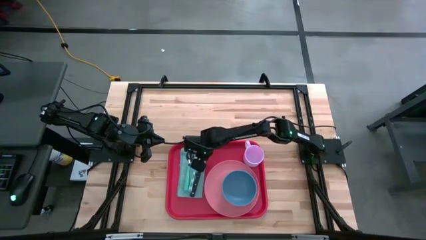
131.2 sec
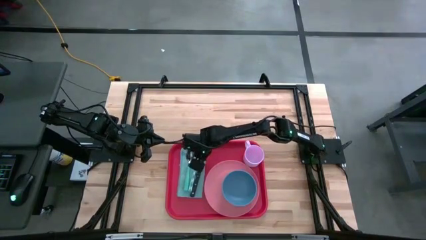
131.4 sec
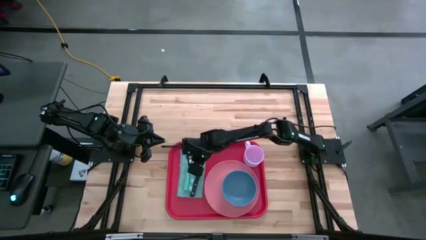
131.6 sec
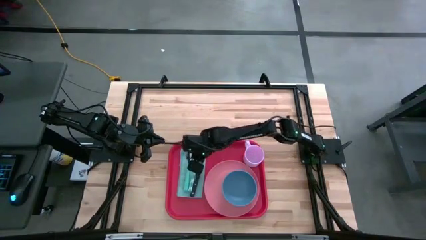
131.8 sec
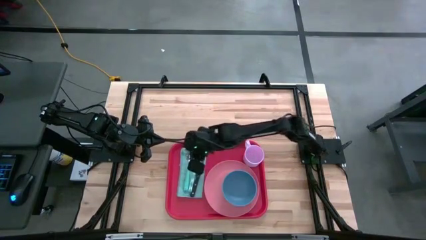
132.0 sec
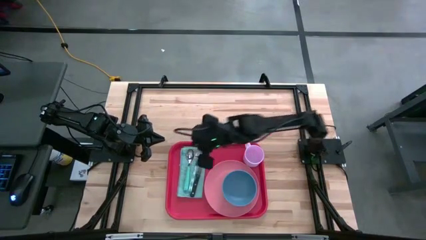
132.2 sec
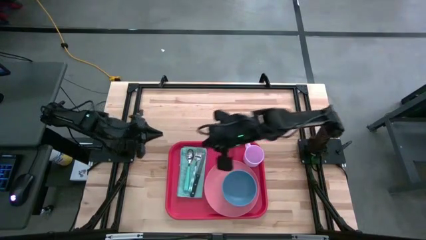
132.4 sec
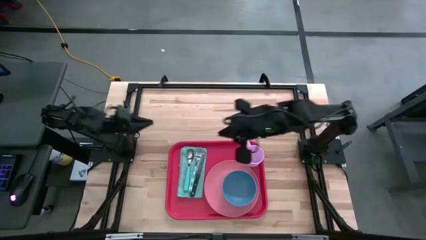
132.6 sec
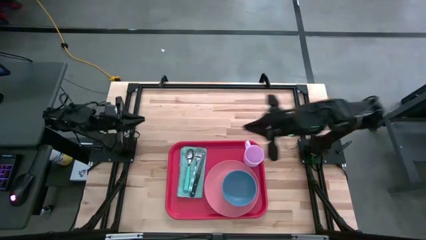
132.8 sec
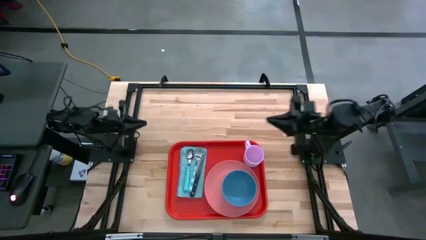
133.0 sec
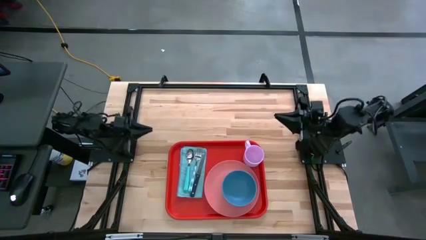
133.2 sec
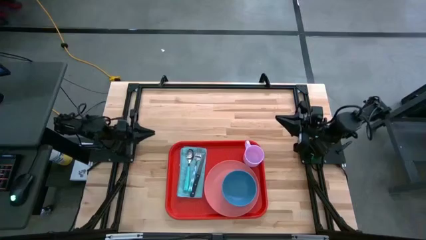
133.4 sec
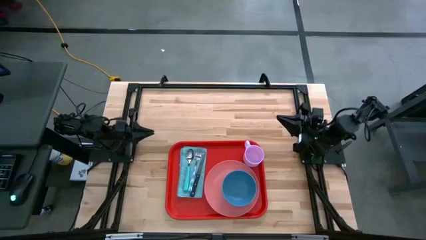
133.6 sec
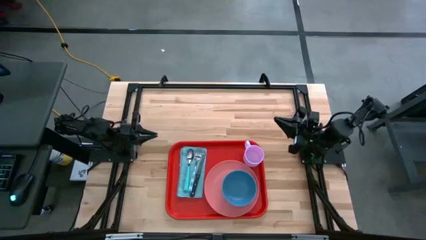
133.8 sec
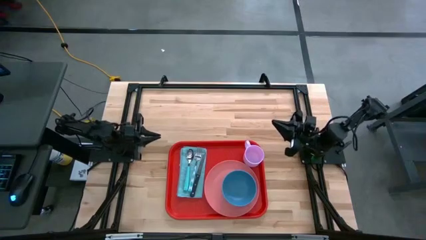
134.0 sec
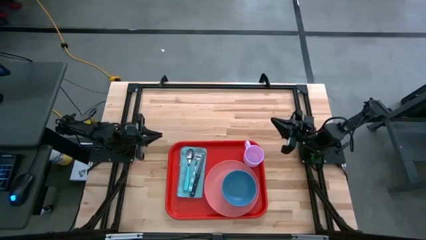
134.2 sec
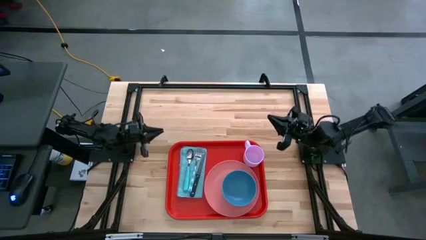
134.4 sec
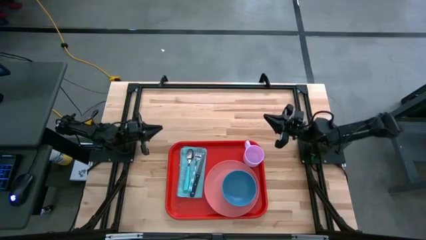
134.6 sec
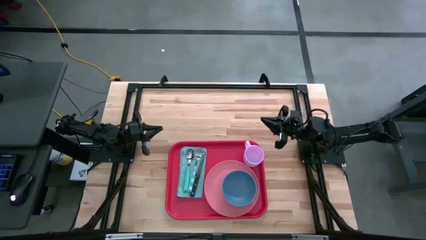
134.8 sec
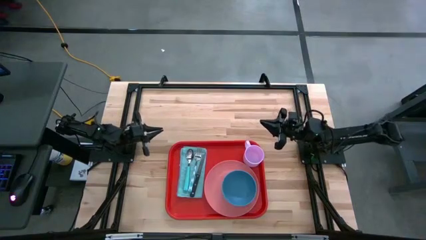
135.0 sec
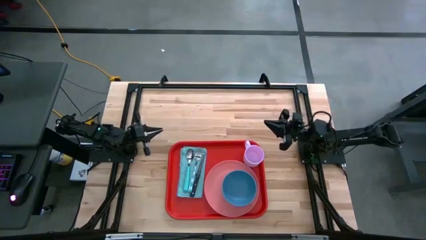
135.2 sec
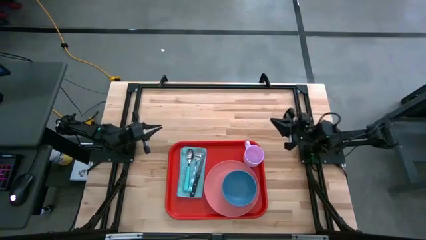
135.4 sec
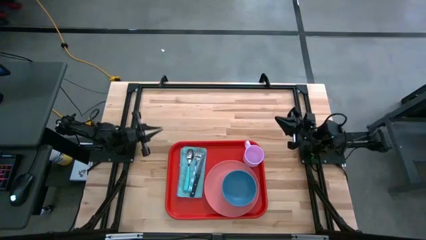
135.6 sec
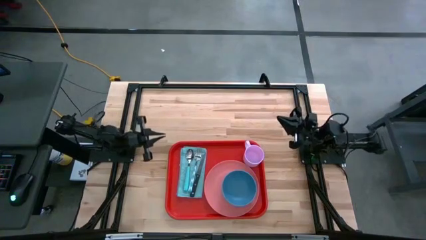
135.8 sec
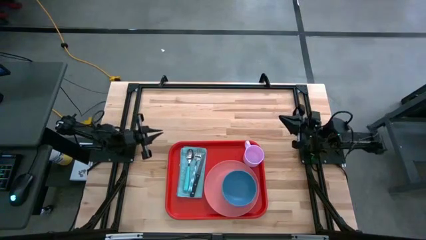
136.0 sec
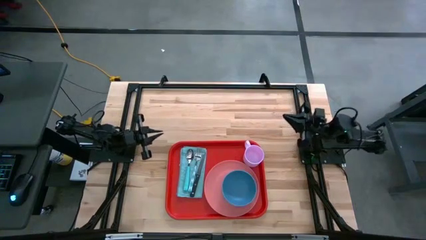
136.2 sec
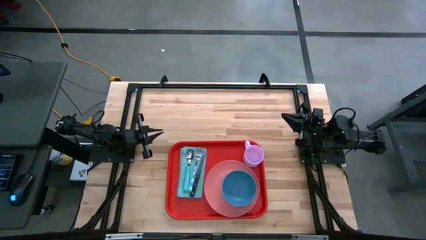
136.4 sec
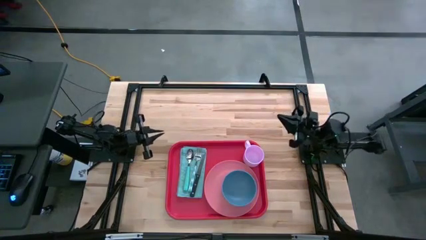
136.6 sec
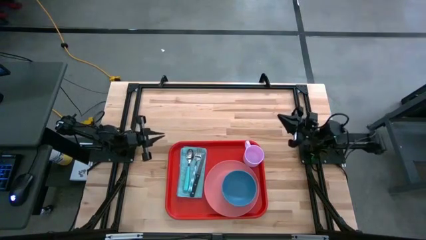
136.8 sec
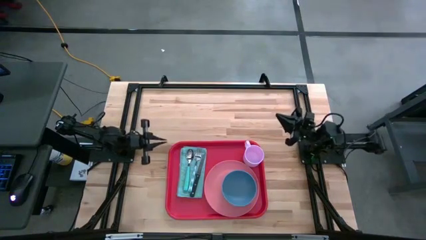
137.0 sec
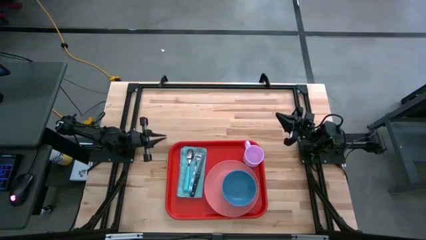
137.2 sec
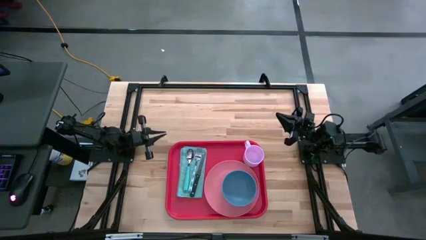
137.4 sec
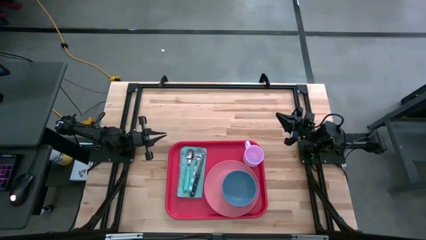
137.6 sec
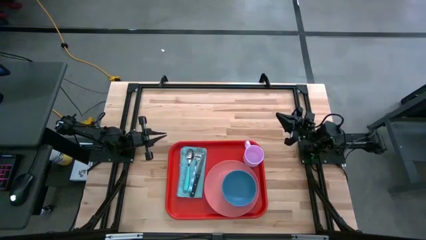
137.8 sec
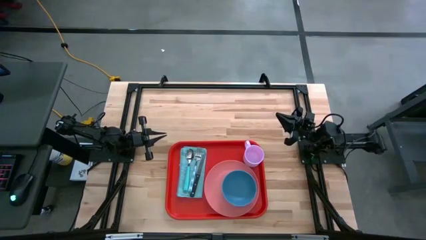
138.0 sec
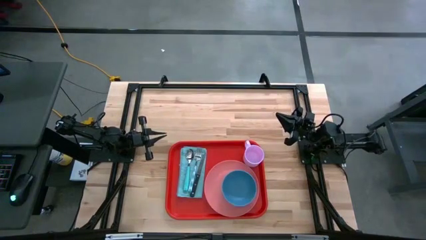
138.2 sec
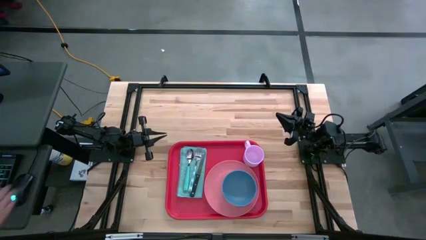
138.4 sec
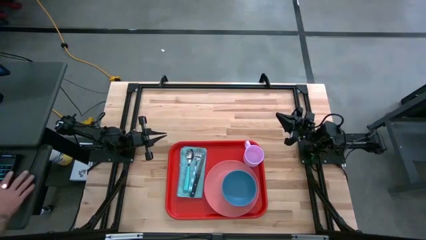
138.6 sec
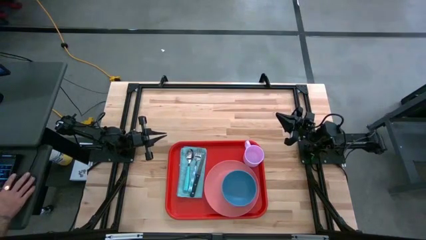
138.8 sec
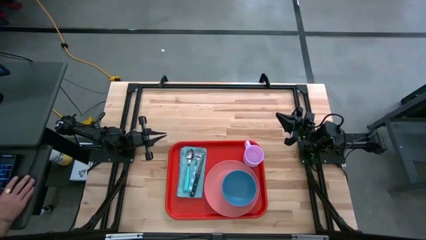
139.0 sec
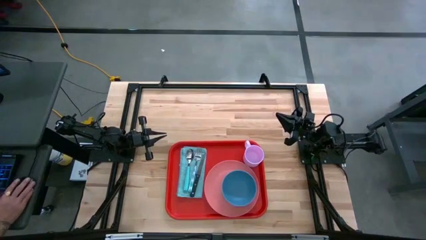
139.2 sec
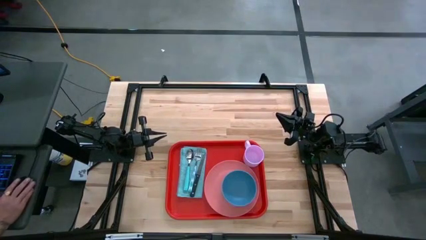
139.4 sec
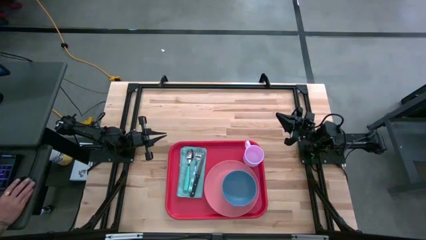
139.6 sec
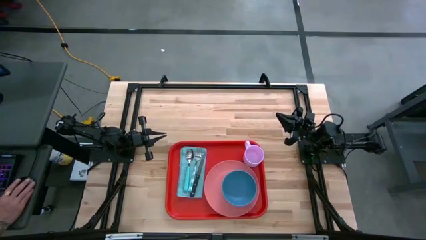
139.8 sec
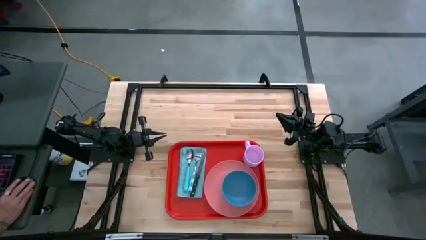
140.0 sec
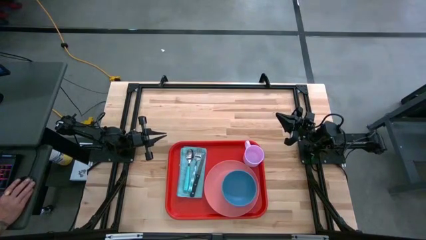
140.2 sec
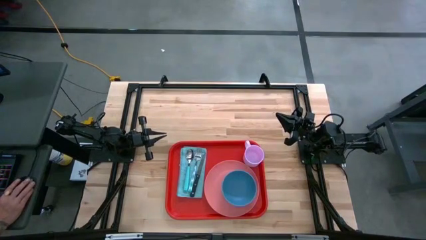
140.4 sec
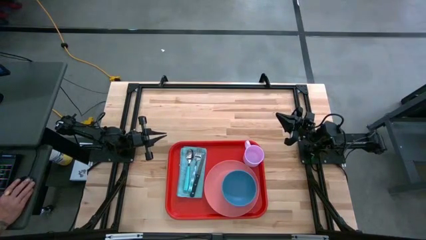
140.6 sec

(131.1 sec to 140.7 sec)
Task: Set up tray
Return to Home Position

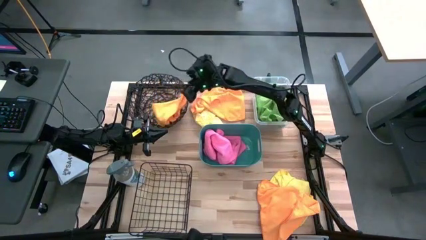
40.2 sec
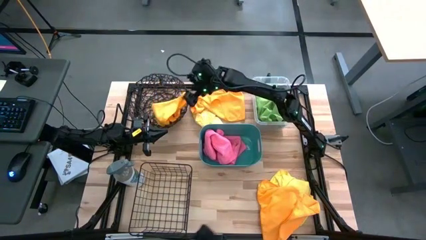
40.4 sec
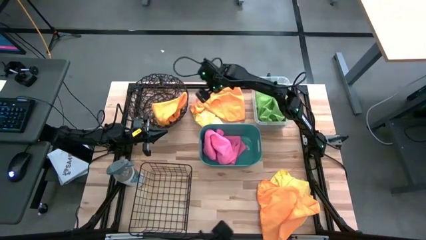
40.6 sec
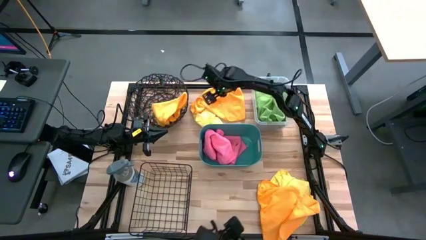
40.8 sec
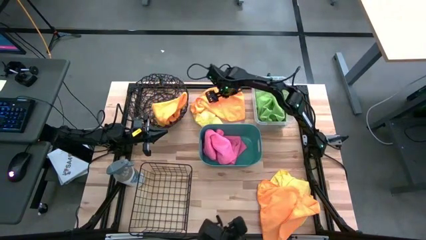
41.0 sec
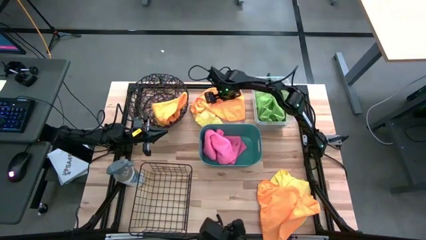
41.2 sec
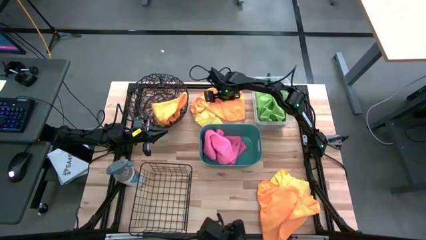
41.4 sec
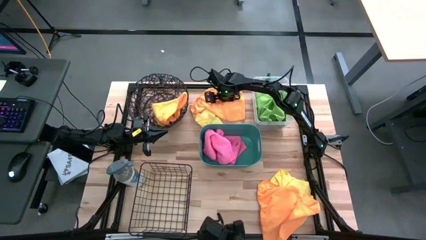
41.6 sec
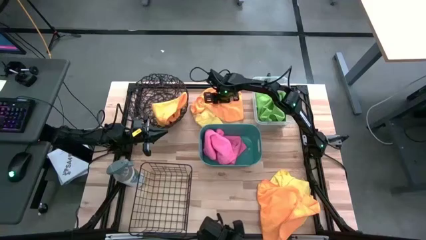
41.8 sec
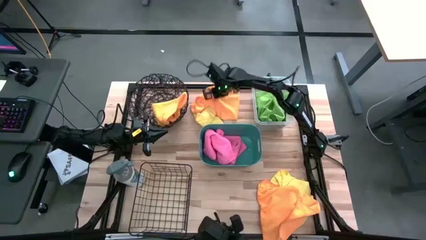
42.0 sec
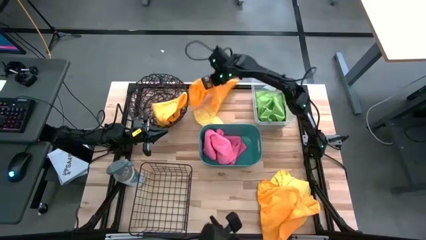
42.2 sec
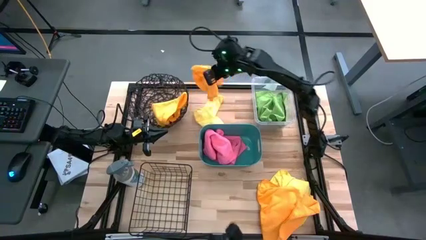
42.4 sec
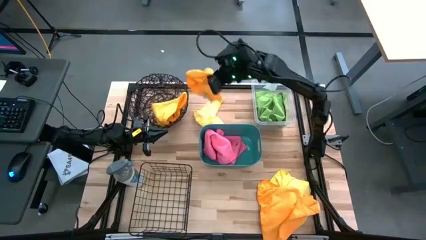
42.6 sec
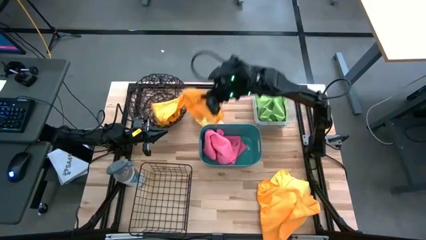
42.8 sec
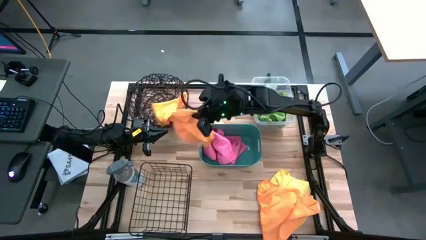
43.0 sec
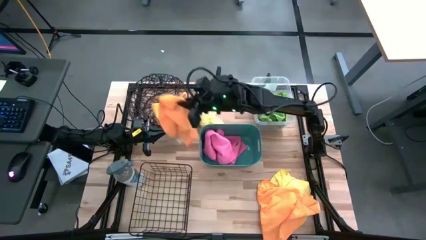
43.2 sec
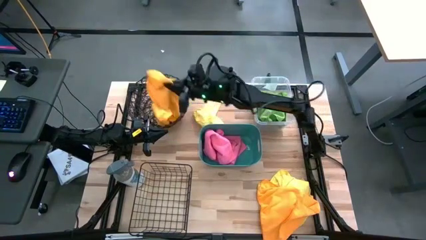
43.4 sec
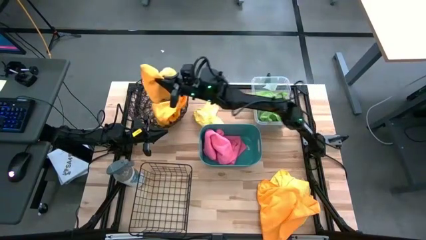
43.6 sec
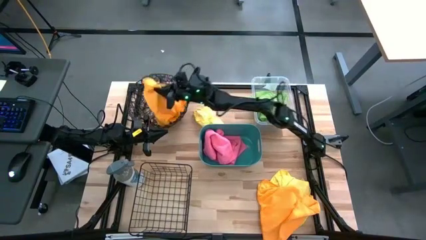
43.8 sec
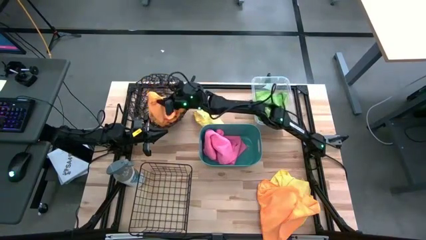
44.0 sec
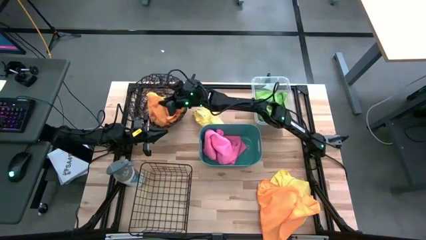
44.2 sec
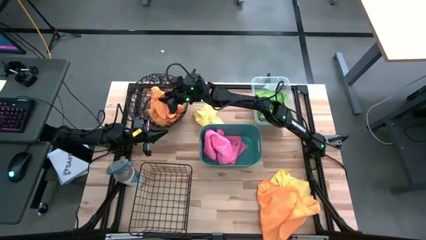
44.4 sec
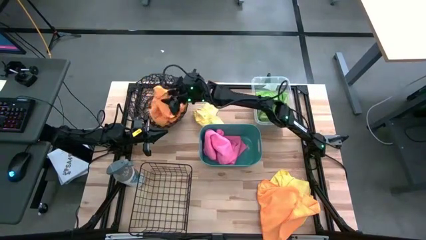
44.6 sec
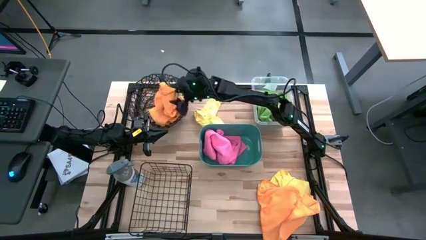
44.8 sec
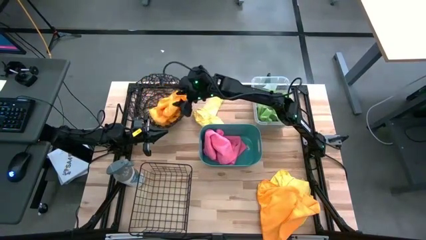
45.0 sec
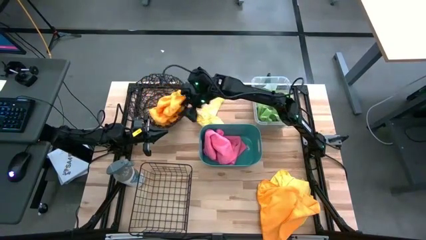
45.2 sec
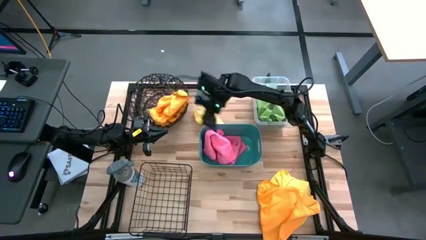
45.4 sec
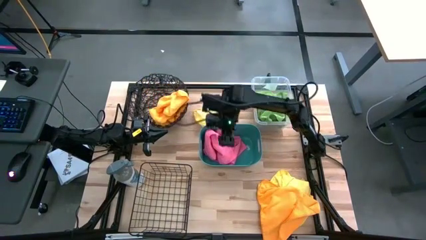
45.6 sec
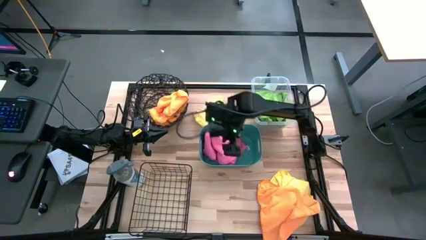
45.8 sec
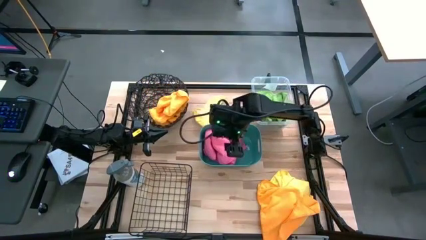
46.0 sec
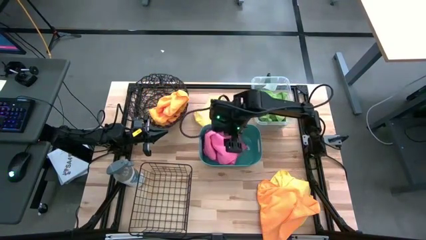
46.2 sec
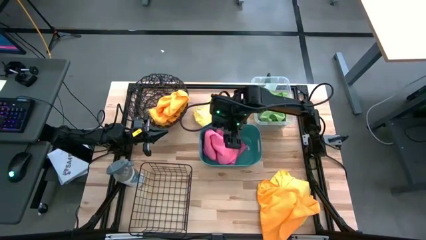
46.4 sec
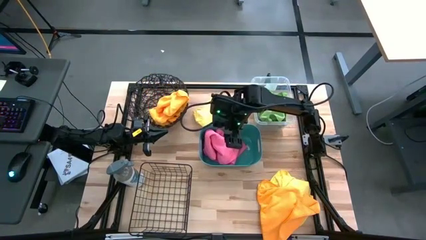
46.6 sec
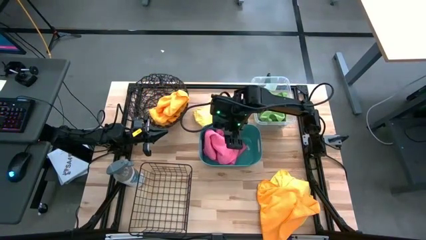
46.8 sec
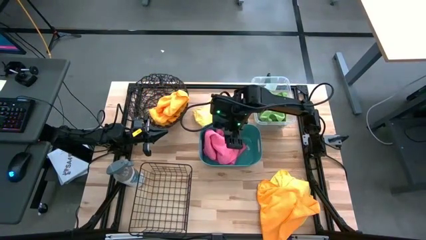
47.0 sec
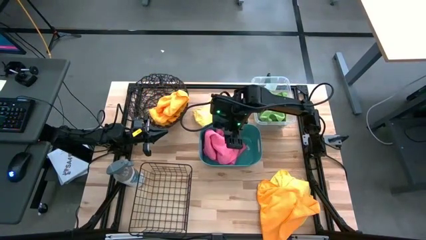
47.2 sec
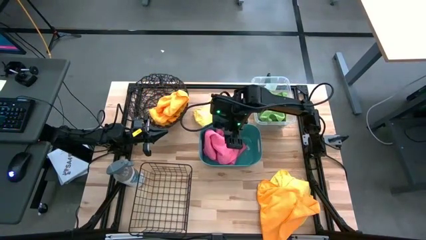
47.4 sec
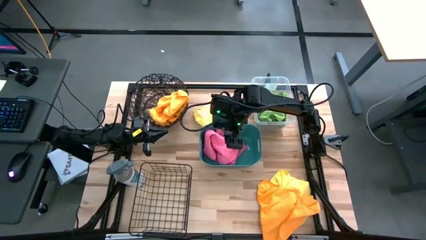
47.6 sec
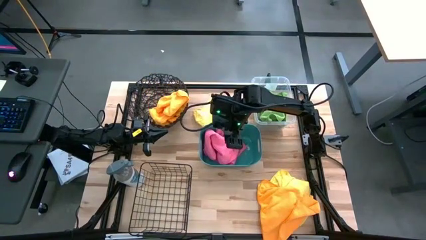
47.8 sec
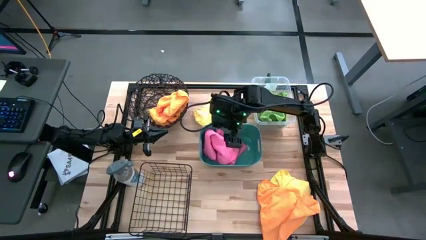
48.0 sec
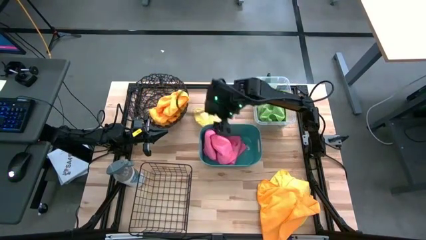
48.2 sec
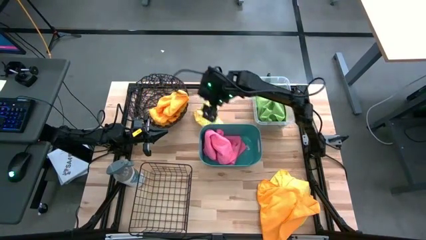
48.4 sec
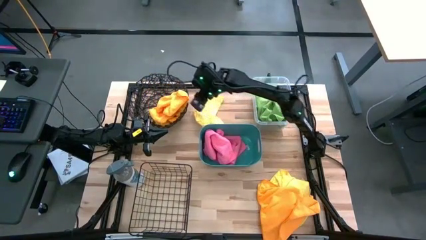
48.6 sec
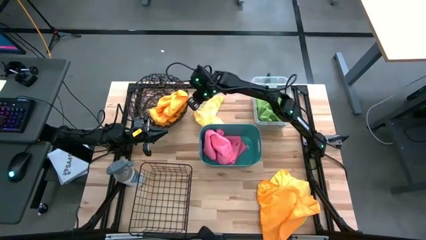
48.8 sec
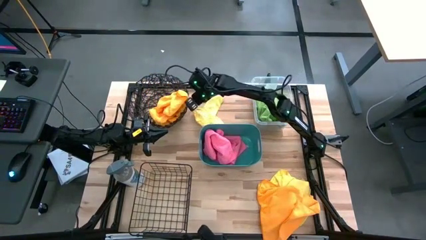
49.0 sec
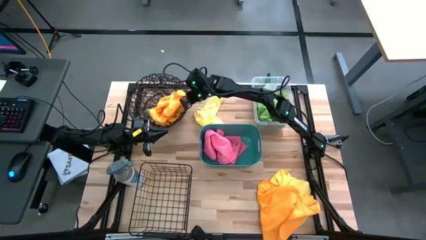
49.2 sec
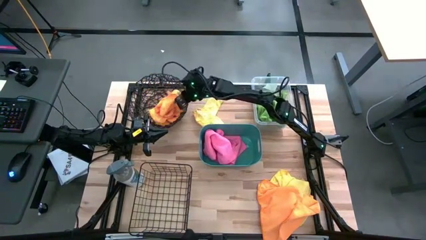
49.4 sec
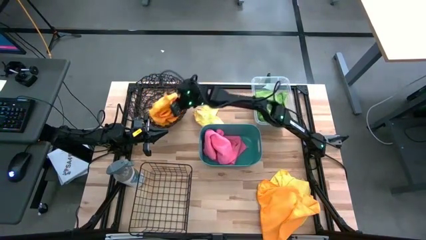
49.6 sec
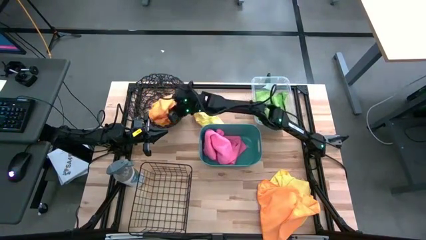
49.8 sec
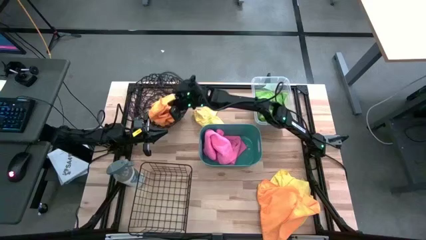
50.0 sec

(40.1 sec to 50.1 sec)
Task: Sort microfiber towel by color & place in baskets
Put the orange microfiber cloth into the top black wire basket
